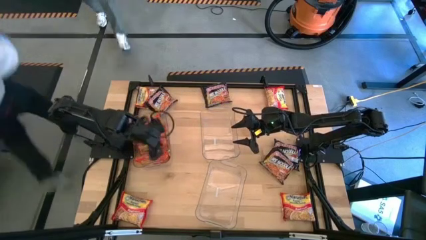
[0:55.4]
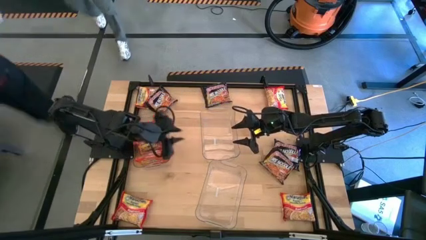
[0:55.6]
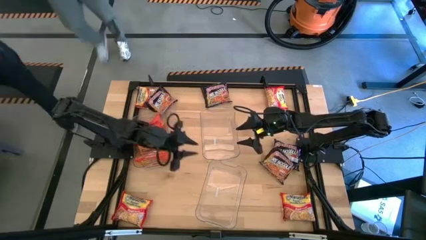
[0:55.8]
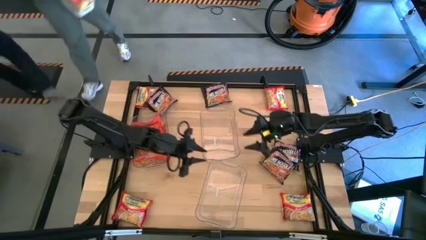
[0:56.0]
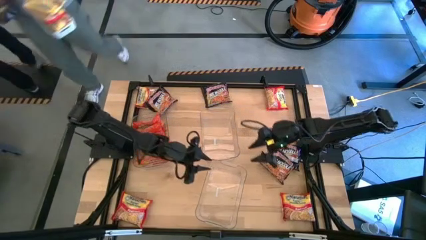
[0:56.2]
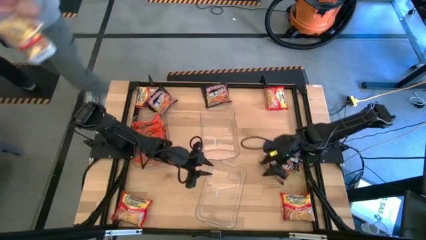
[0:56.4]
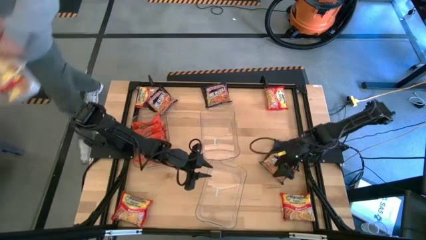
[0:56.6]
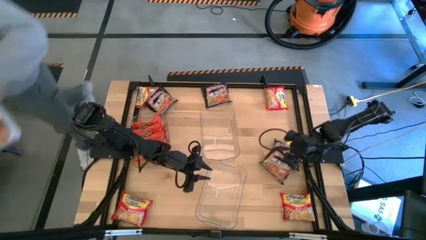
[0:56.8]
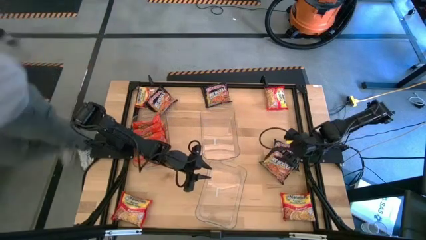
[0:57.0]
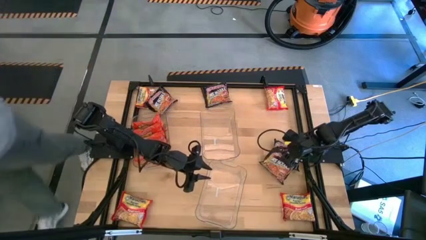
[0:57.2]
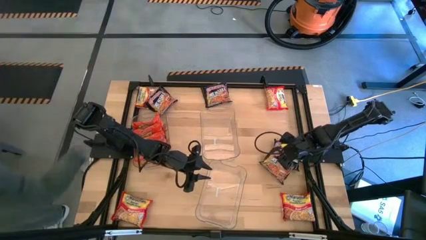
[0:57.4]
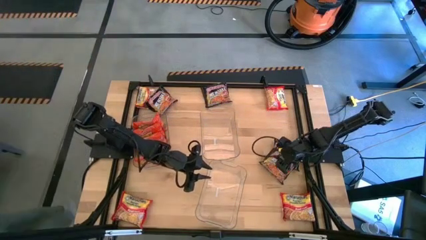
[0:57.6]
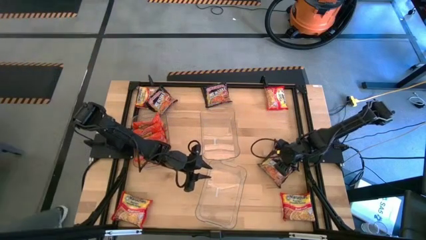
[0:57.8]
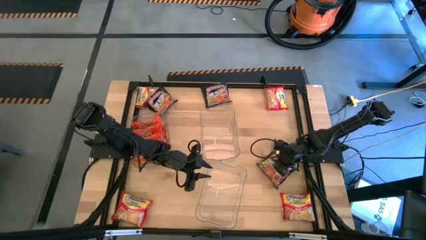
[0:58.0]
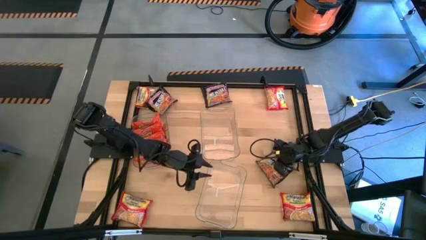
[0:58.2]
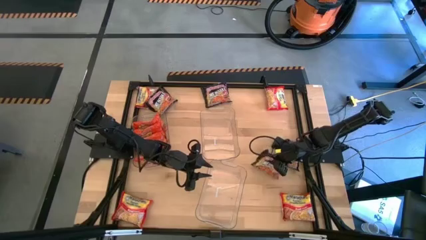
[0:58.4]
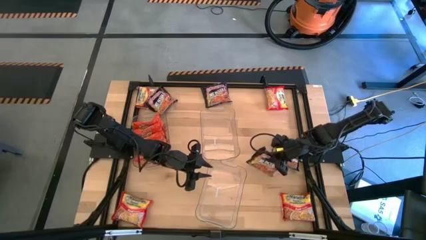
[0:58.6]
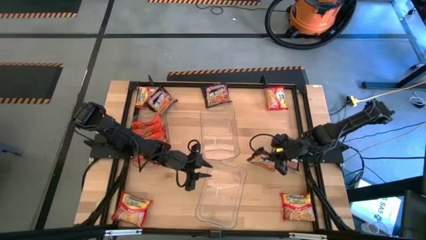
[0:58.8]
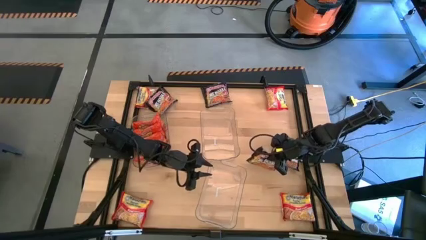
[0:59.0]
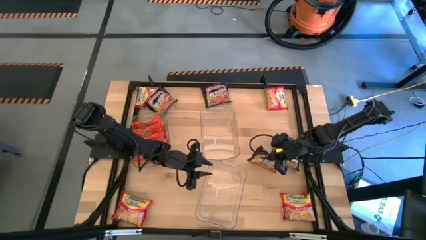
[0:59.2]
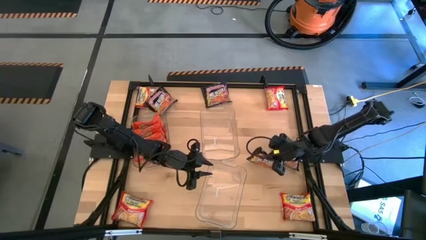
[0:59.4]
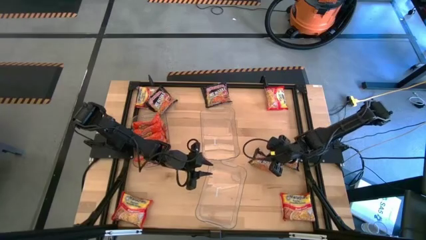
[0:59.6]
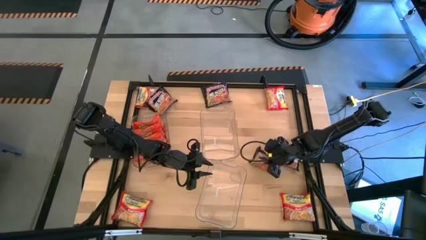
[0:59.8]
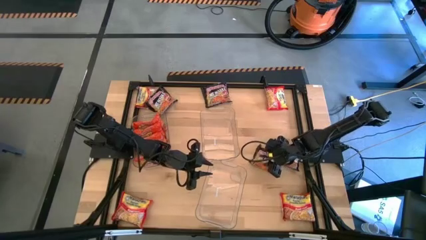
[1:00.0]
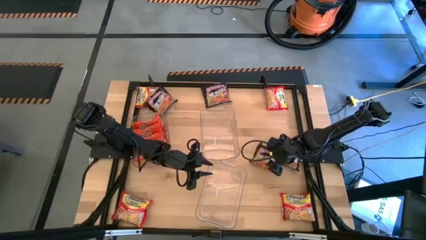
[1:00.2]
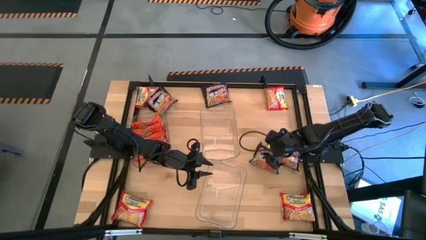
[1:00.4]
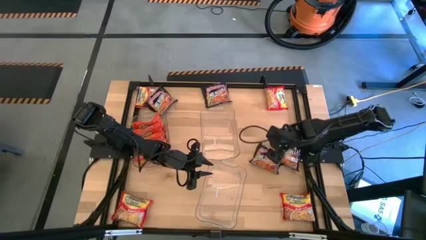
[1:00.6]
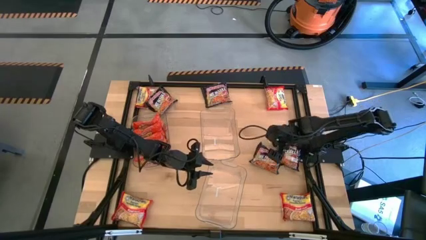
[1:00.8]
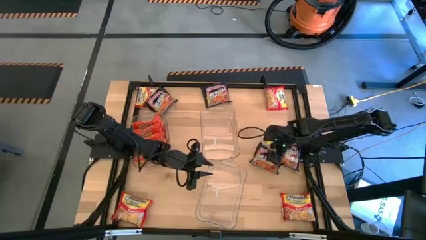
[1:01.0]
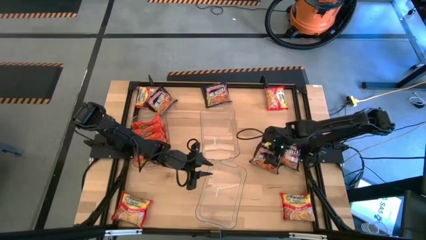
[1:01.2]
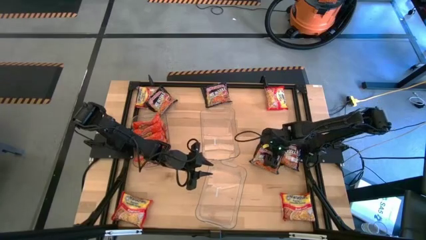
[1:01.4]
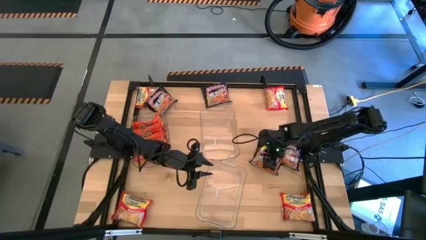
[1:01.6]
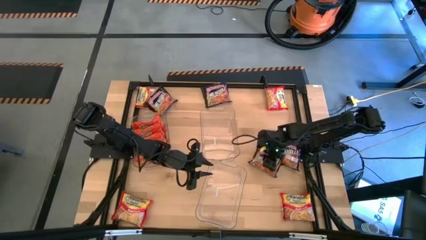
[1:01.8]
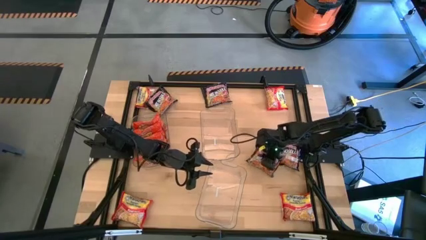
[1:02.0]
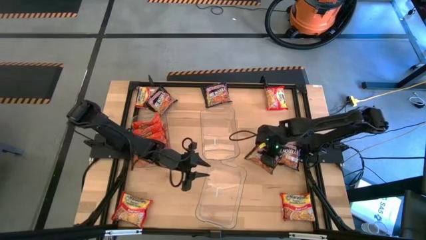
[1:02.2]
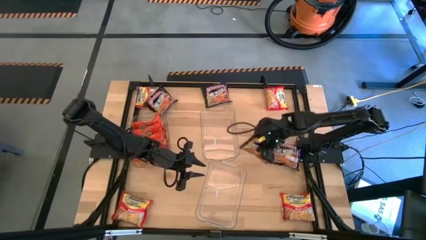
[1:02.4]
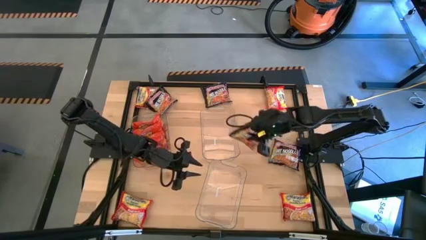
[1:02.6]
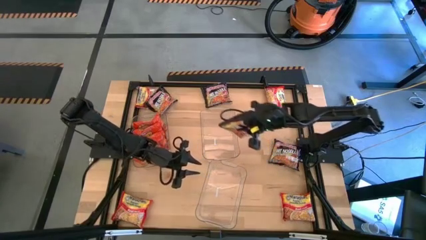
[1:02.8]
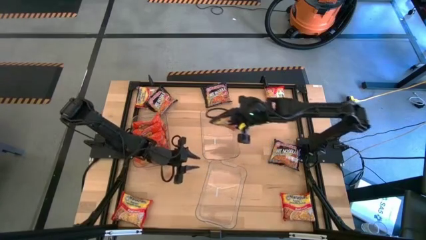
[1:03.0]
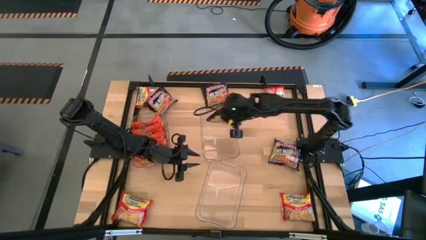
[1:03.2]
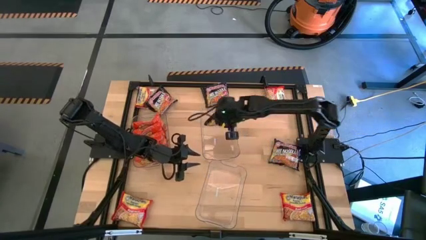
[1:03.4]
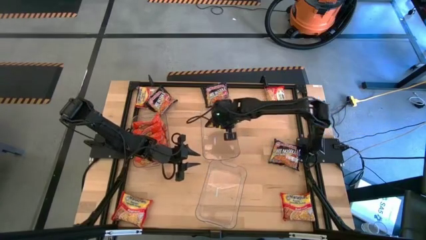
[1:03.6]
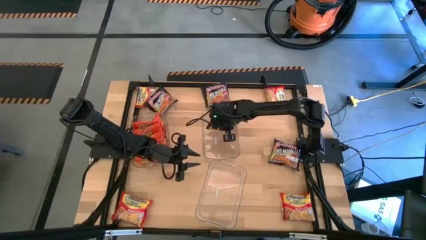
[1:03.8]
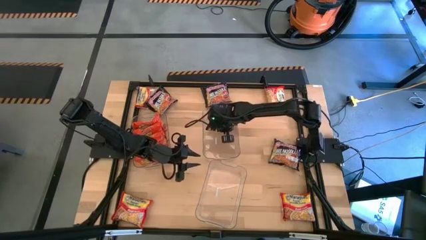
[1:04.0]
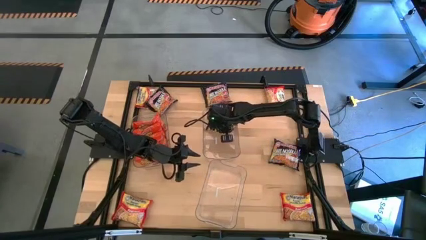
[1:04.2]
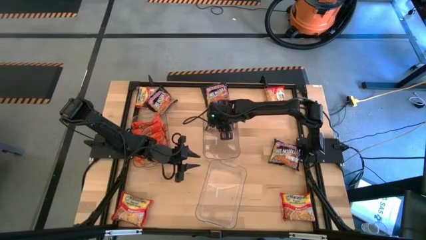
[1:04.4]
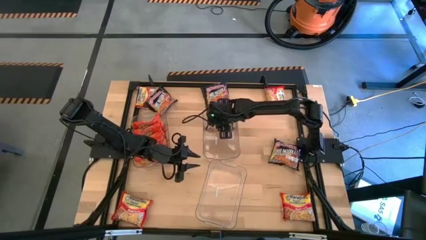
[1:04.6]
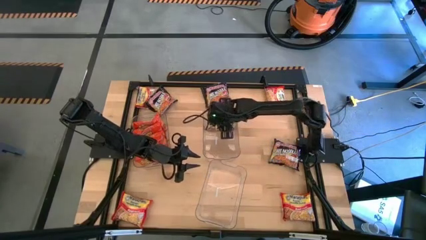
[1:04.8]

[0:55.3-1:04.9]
Task: Sort Maruchan noodles
Put the black noodle pack into the top right transparent bin

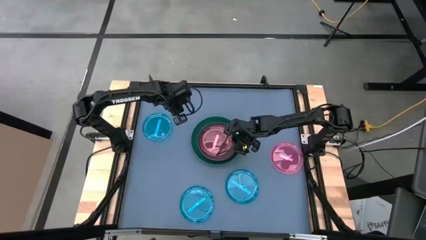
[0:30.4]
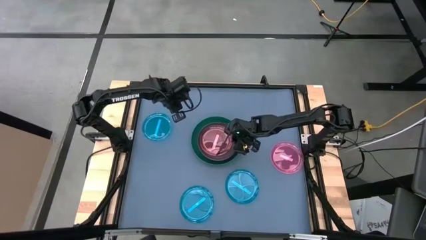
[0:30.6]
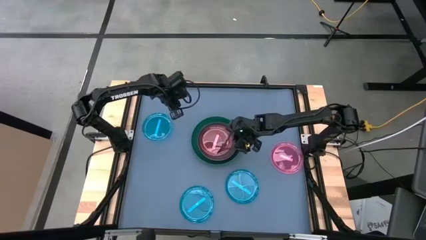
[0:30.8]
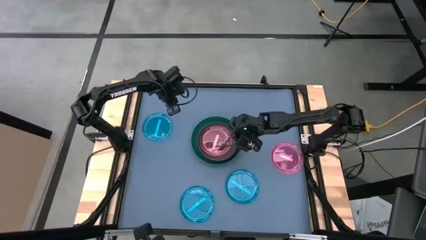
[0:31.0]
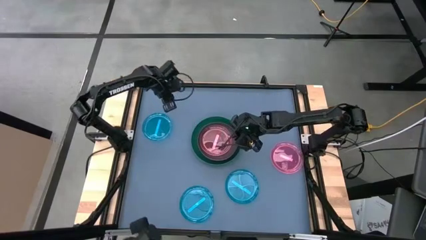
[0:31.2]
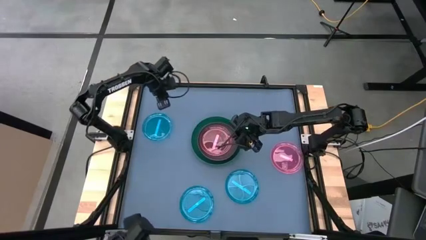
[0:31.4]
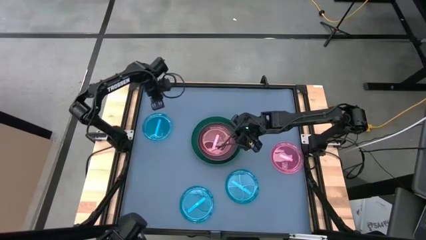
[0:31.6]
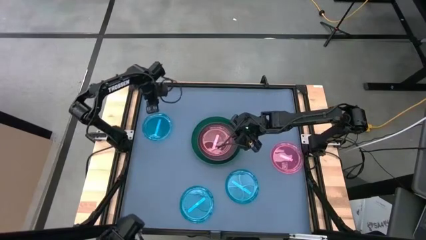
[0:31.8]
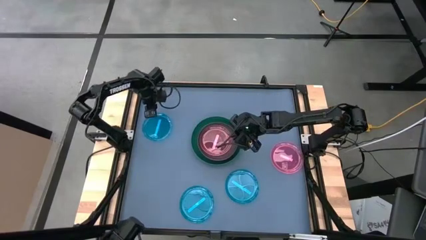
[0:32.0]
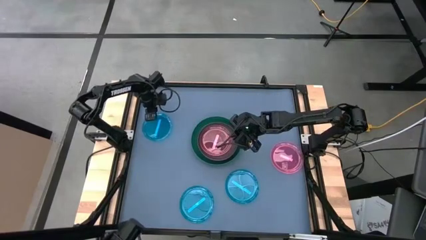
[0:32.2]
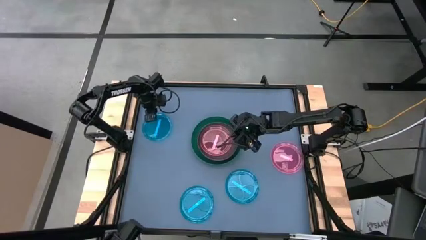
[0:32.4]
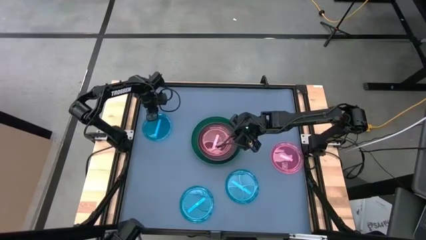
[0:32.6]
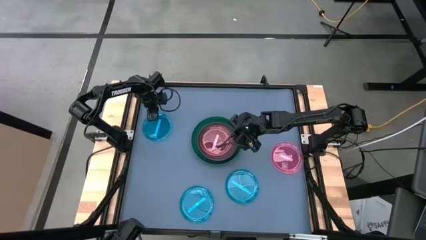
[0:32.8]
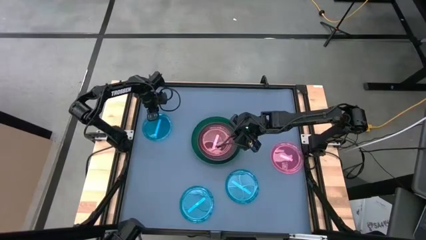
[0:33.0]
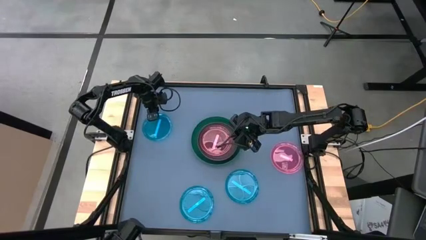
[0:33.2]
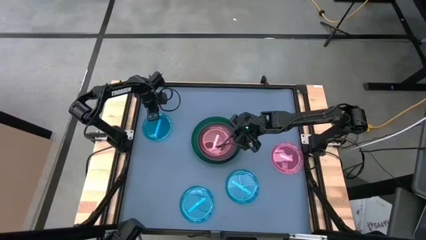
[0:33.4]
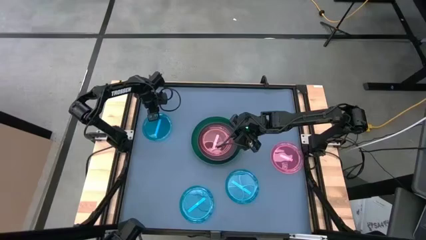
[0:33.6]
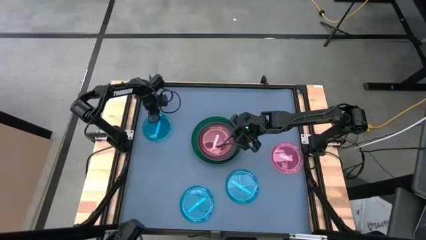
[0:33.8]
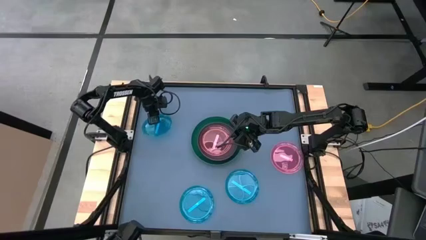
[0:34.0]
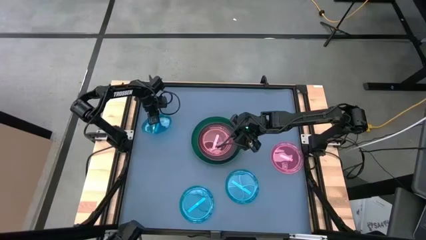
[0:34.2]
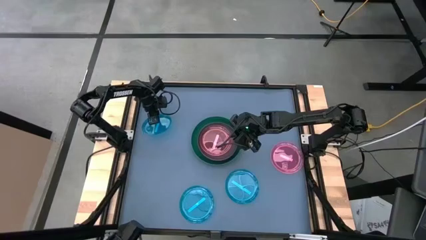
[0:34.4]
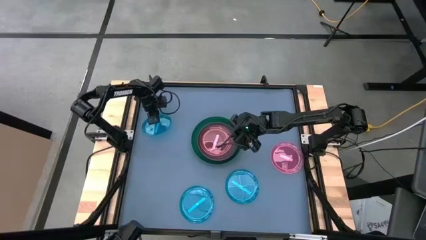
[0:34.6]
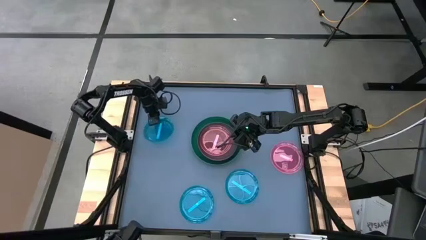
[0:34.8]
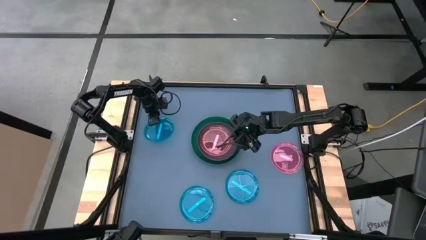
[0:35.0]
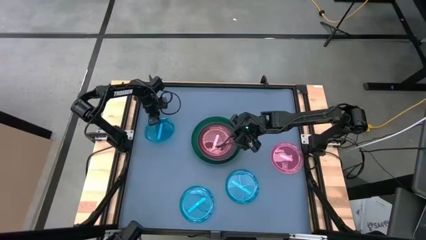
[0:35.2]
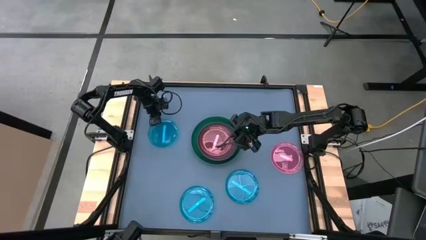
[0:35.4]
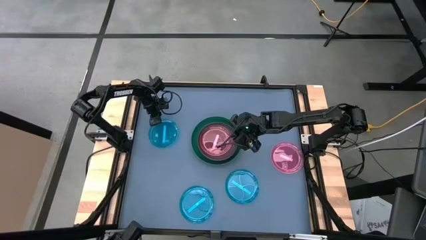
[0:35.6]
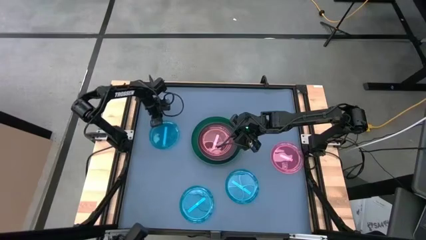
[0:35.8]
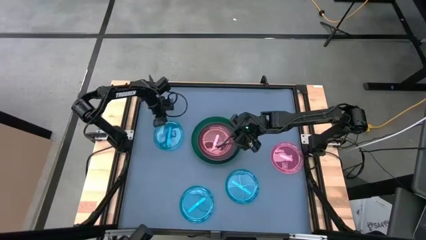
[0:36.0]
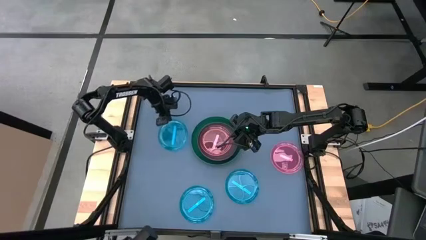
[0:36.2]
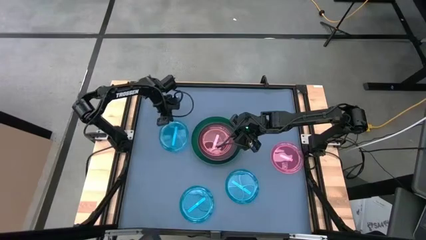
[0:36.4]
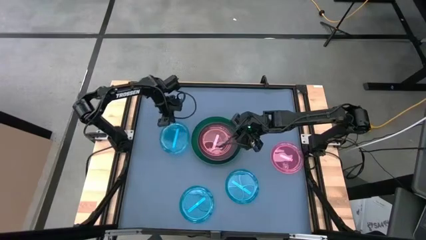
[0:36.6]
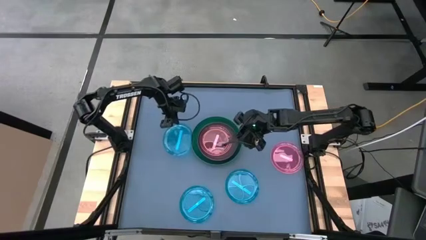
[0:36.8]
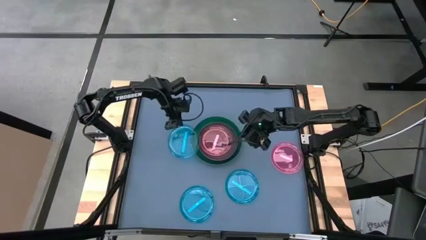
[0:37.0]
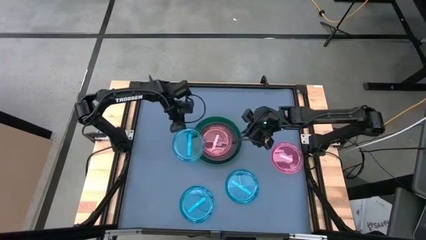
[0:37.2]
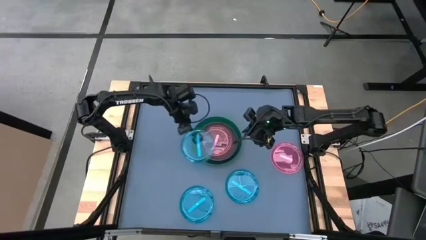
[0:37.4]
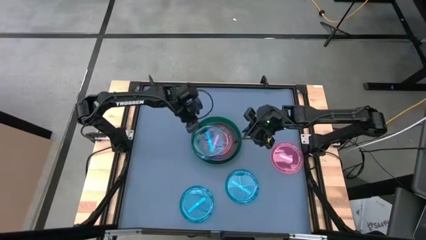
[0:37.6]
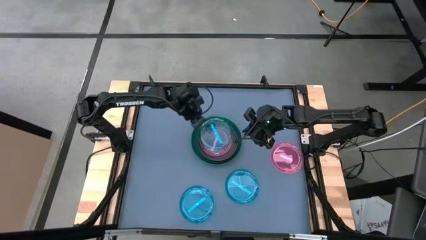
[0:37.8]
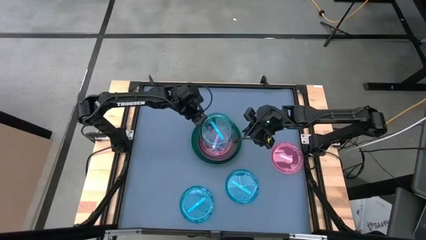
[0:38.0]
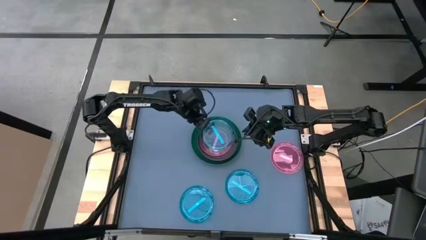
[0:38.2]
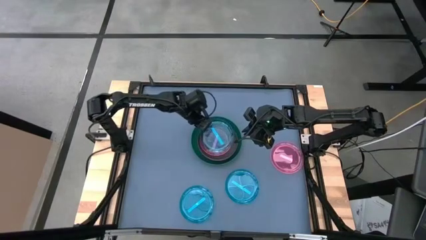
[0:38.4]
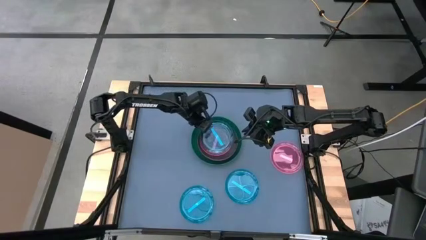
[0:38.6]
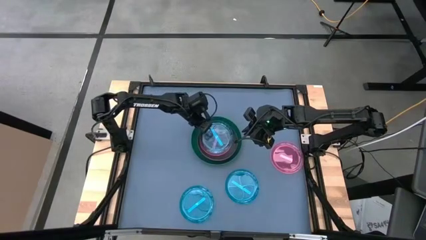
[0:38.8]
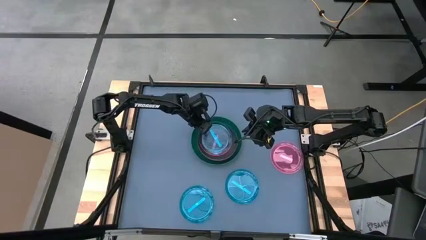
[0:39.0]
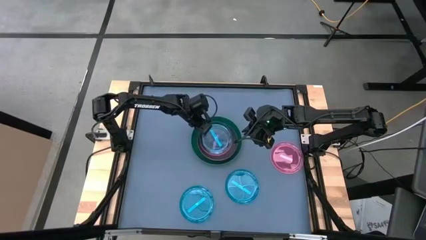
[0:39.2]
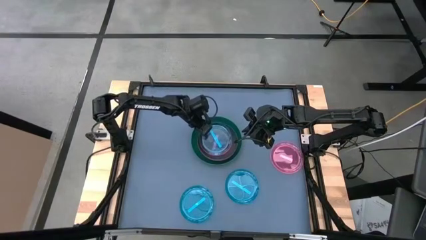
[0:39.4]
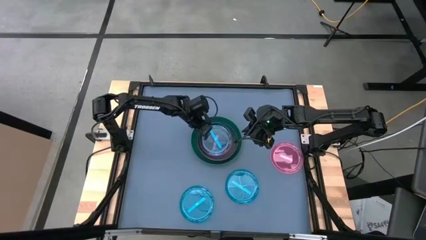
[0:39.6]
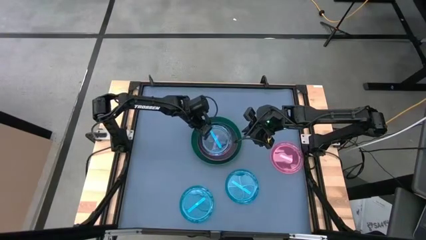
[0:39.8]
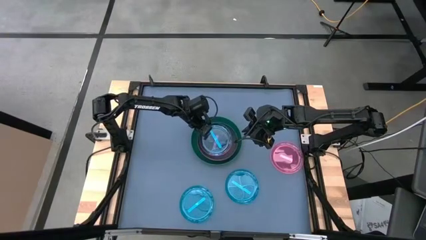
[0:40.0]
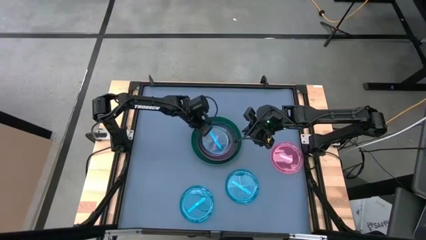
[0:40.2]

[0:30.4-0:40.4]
Task: Stack plastic plates
Stack the top blue plate on top of the transparent pink plate
